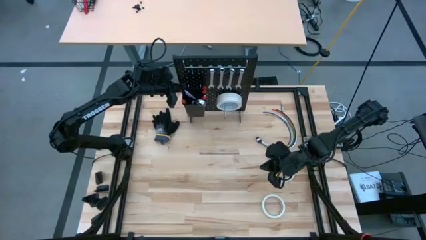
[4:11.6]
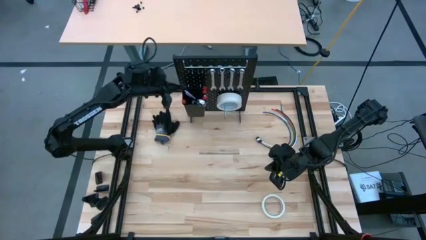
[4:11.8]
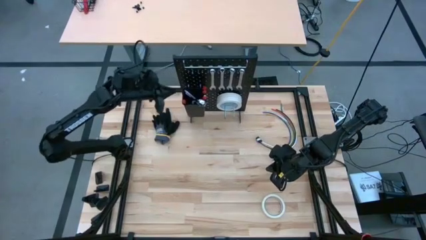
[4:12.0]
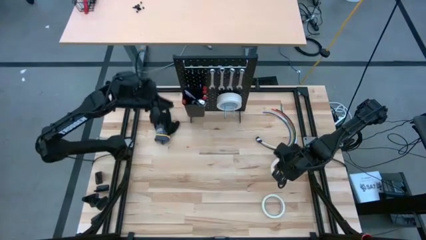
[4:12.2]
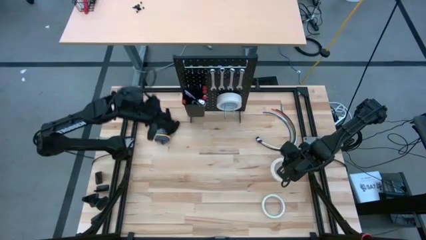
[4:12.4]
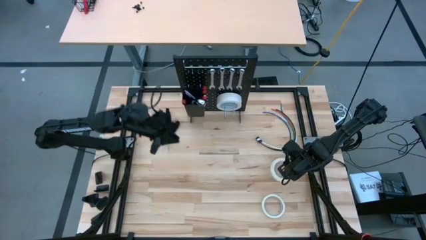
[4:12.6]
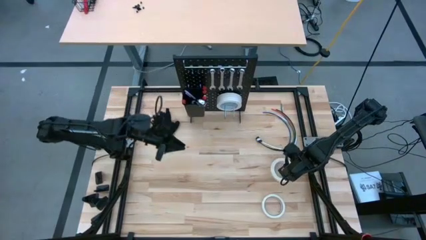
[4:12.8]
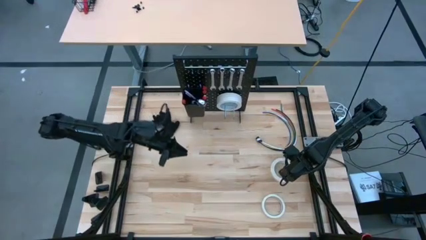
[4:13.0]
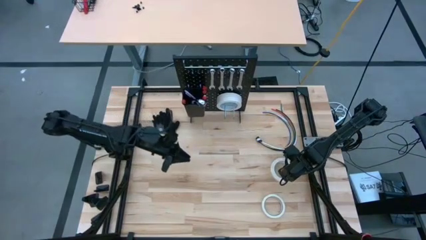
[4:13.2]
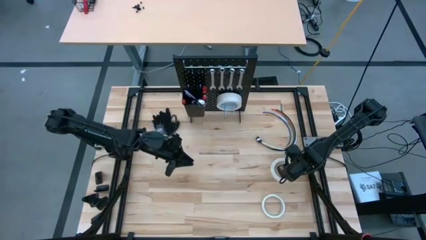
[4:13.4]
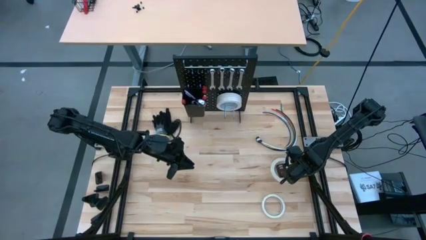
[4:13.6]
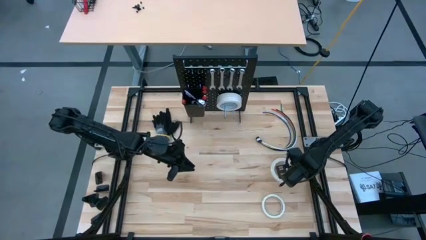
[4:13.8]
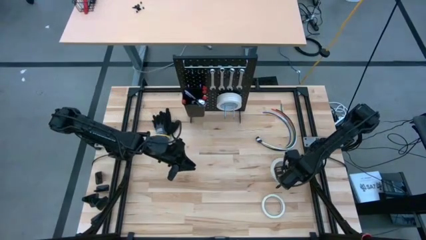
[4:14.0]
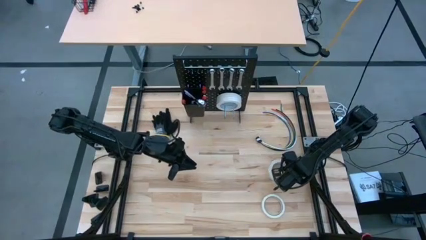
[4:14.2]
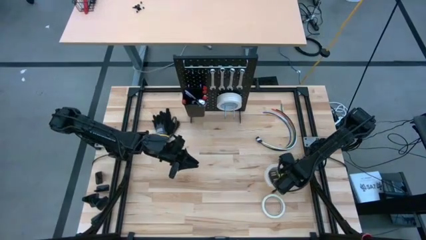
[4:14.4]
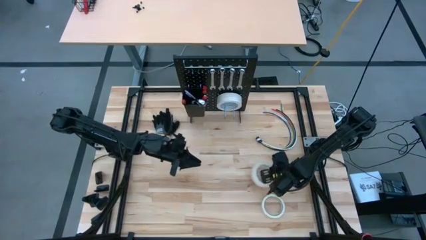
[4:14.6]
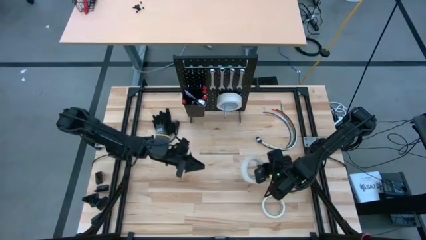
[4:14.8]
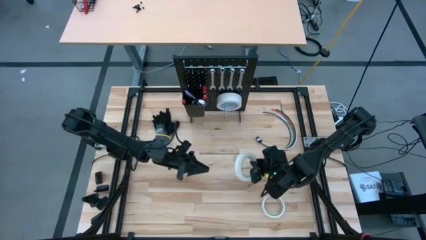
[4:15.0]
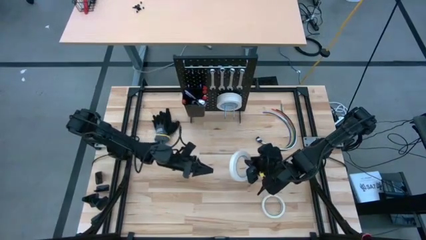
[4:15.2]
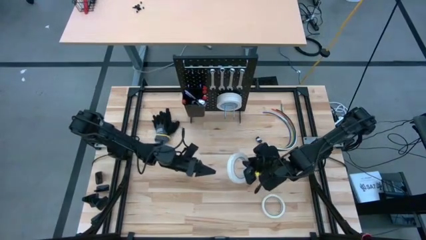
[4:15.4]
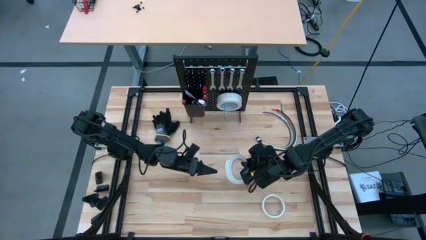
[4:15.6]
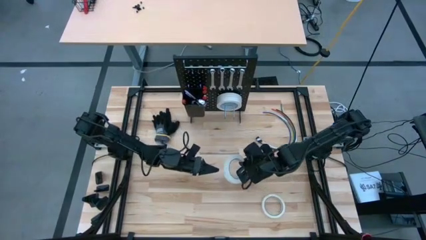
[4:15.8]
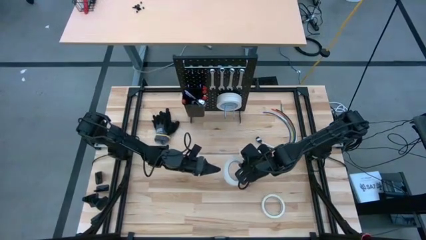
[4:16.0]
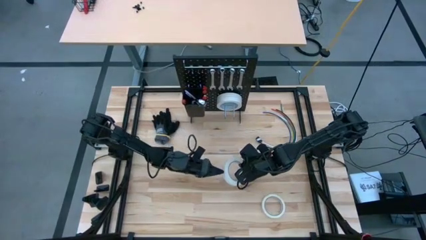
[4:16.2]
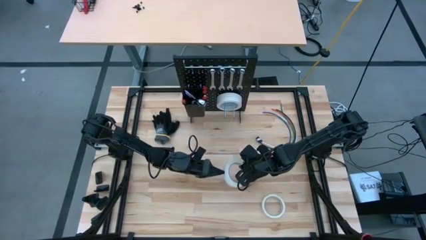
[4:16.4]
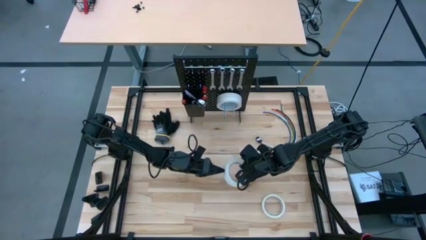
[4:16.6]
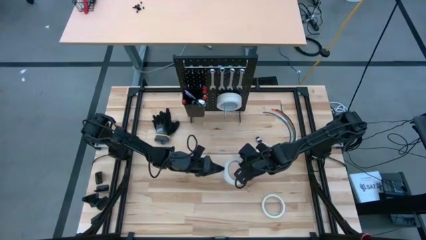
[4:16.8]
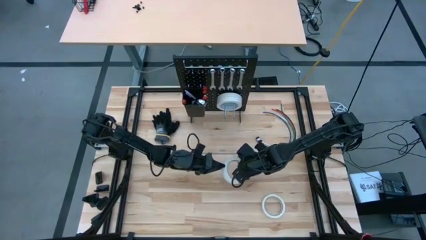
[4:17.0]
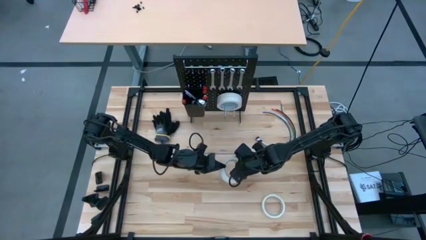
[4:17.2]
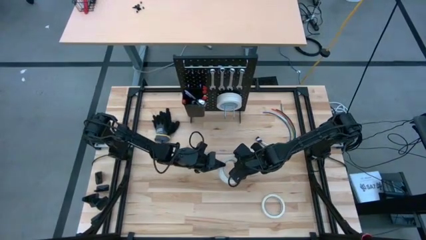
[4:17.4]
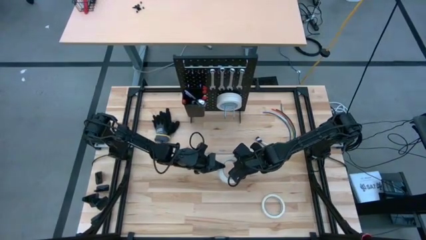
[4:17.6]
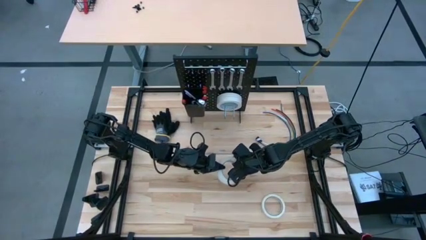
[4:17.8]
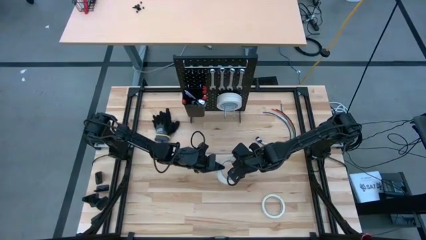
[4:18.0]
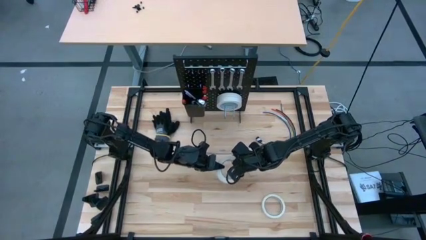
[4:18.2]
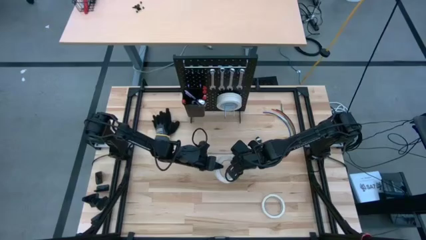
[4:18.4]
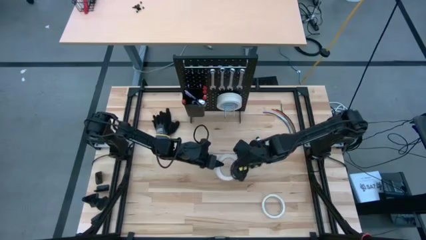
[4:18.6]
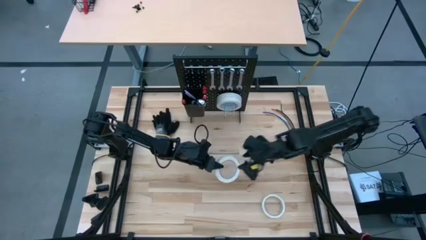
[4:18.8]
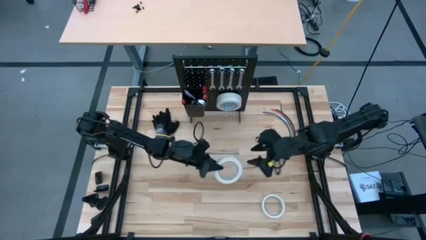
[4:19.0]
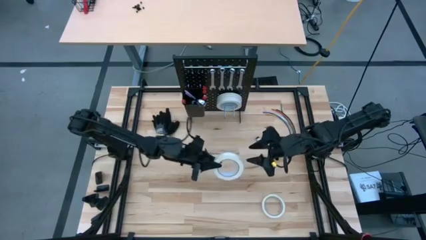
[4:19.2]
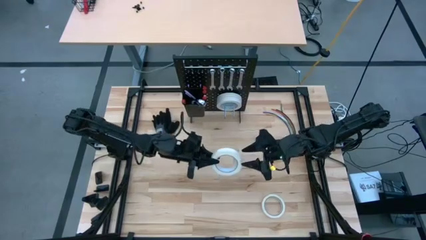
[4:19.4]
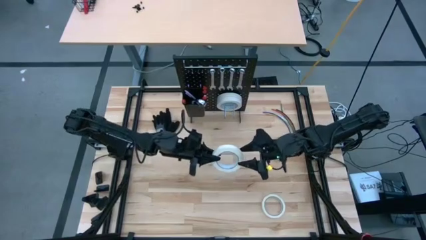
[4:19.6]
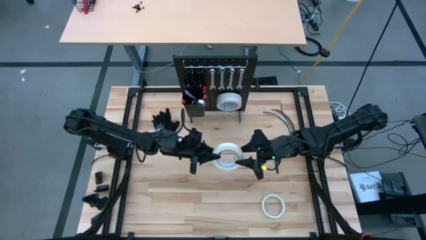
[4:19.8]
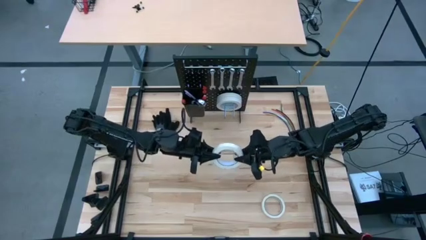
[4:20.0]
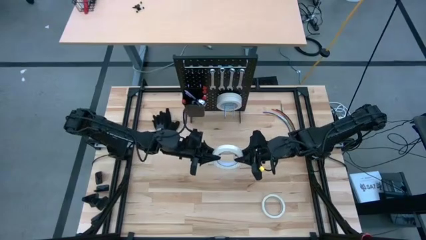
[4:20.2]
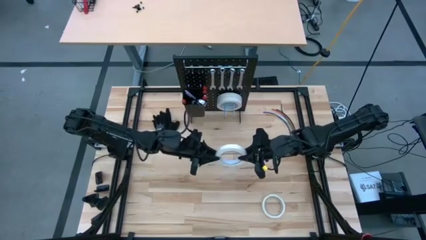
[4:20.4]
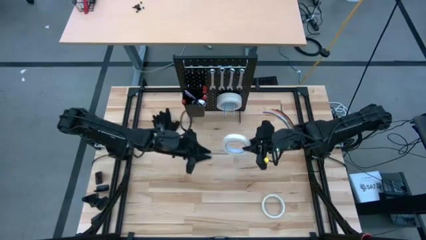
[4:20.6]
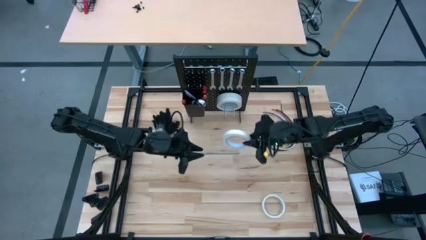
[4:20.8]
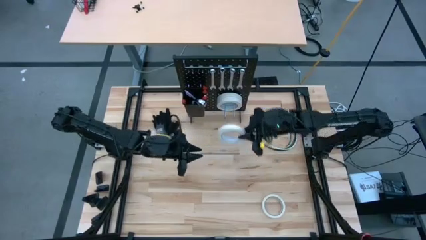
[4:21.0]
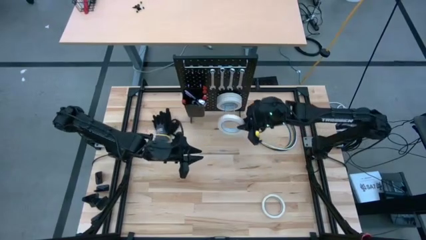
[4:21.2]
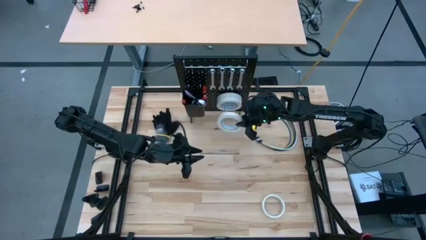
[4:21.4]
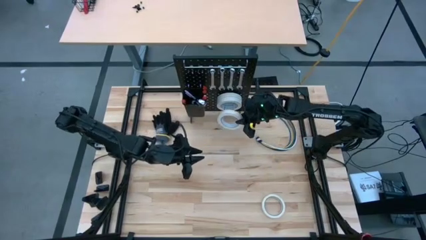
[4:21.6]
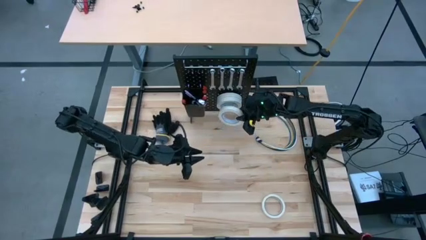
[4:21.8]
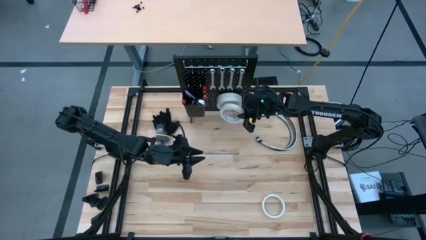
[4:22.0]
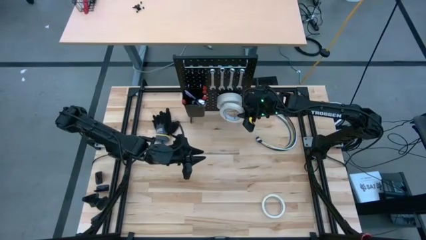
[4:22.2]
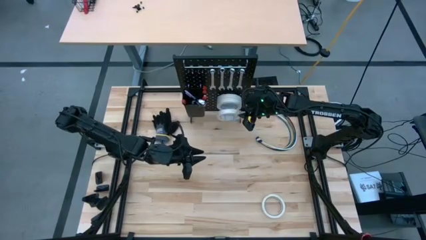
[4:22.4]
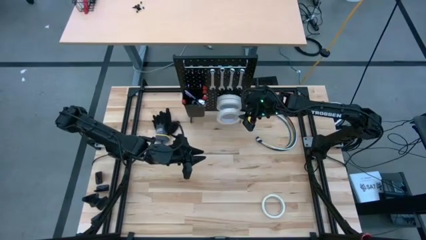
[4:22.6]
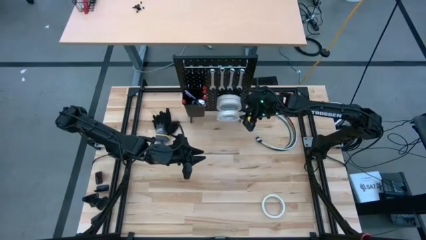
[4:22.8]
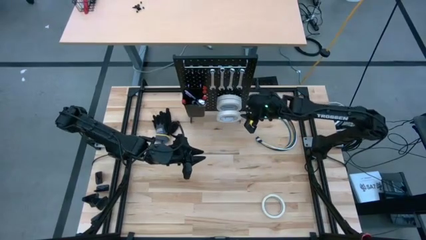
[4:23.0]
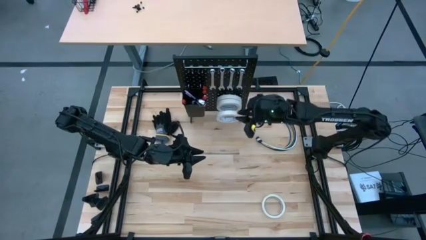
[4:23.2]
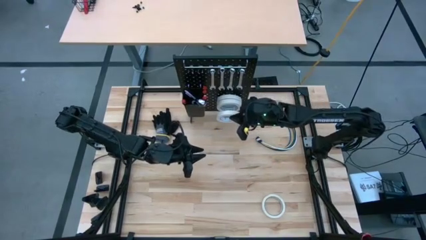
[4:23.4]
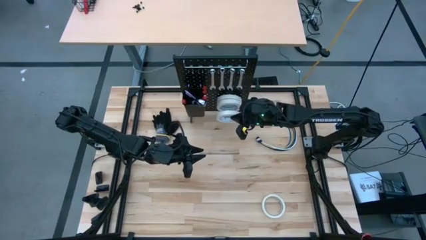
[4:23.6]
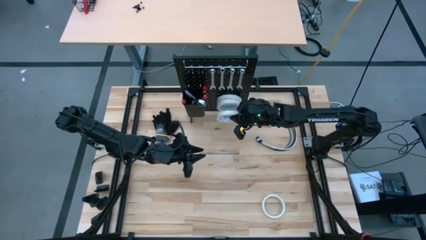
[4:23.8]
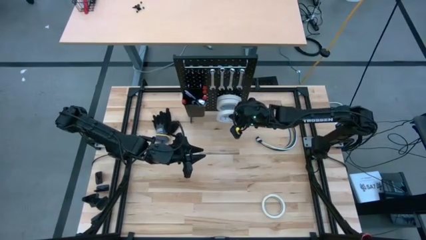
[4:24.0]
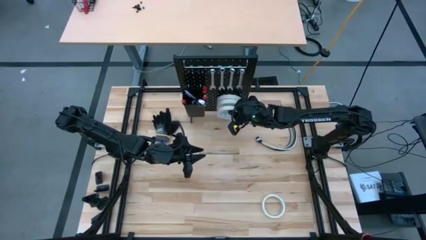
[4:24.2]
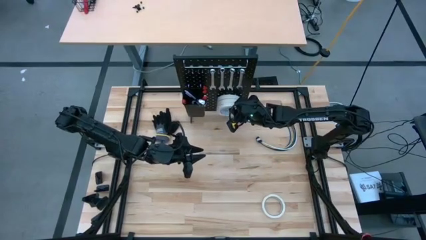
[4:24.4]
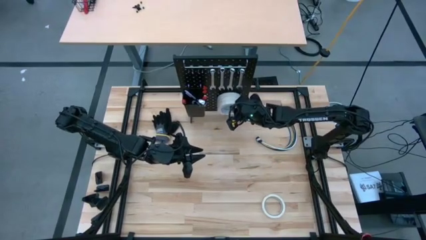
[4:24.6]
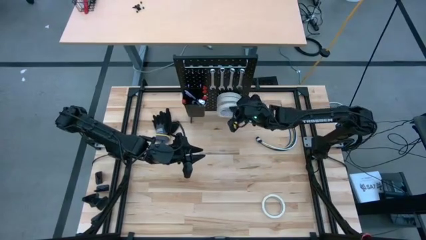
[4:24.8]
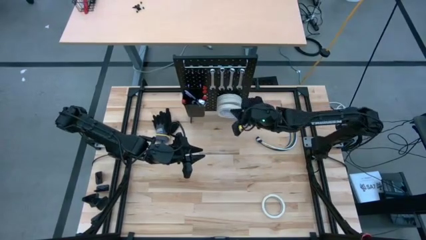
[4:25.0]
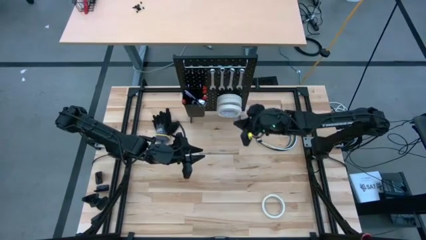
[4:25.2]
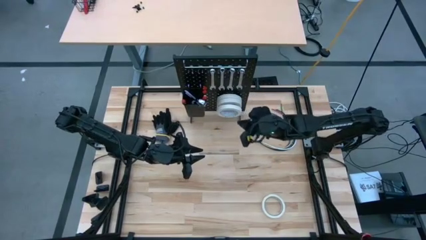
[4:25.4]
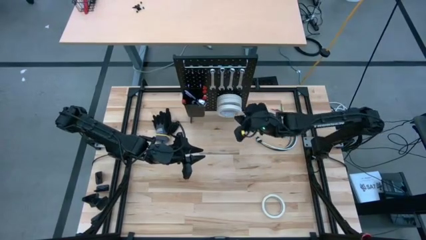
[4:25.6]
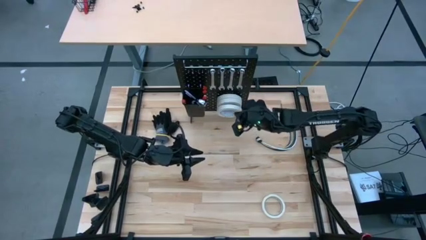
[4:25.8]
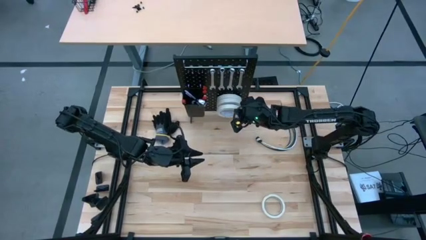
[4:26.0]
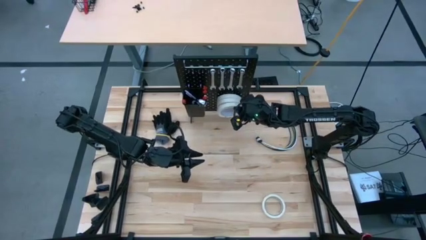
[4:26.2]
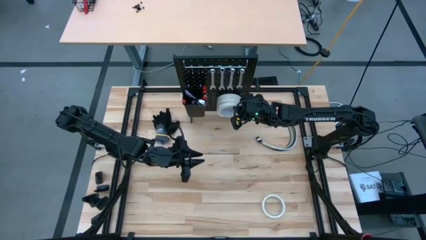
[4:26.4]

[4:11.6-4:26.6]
Task: Hang tools onto peg board
Hang the white tape on the peg board
